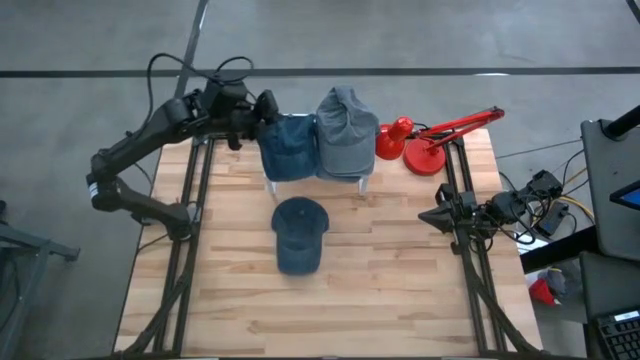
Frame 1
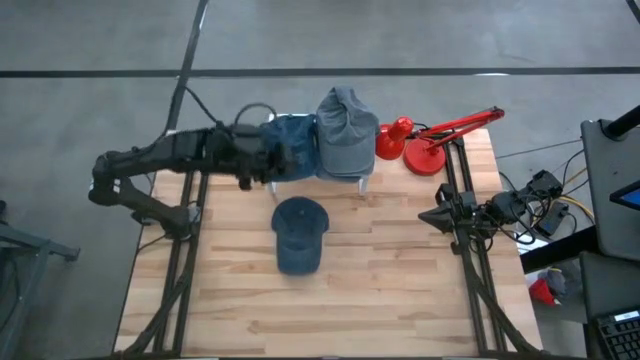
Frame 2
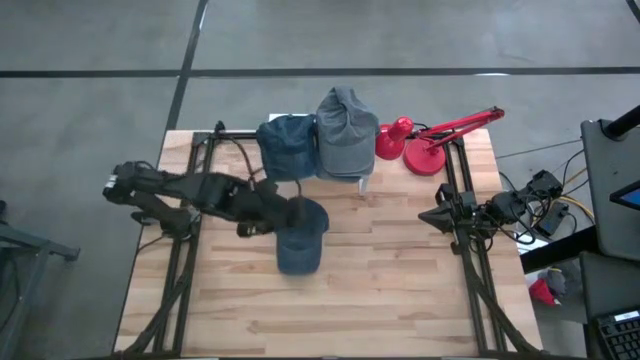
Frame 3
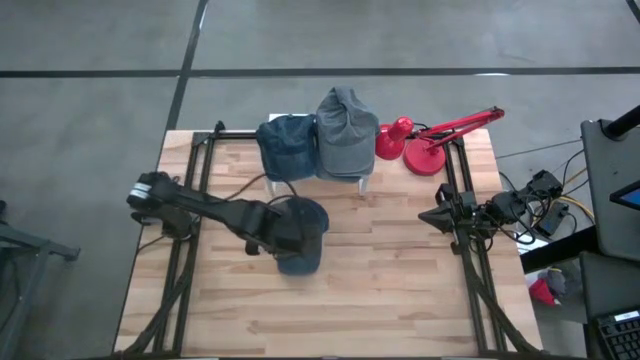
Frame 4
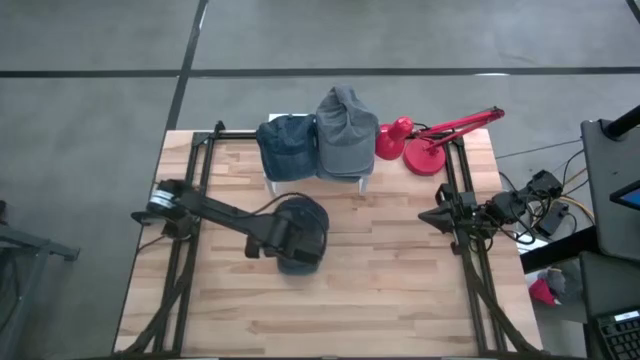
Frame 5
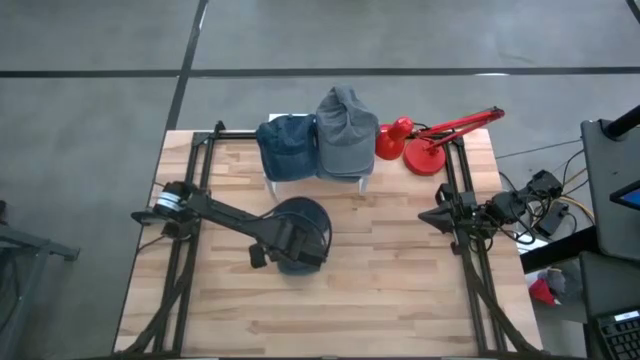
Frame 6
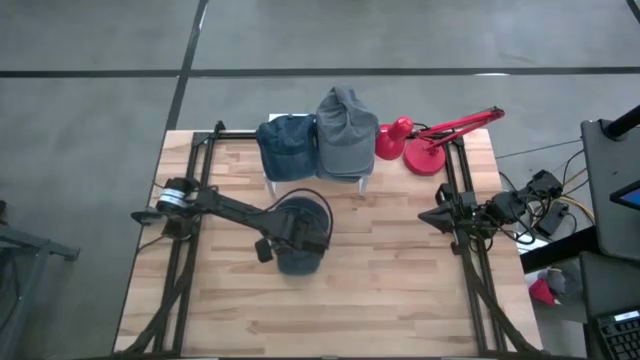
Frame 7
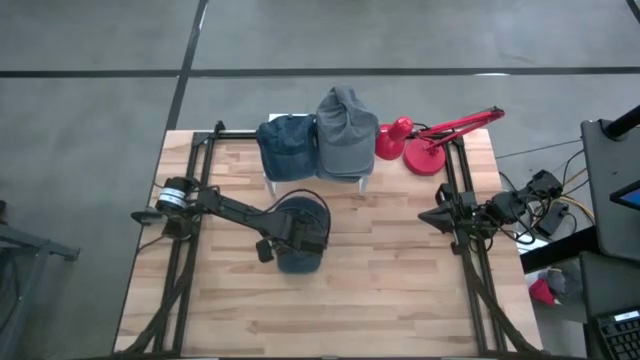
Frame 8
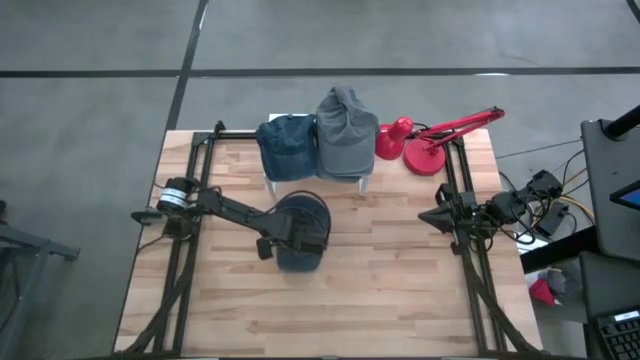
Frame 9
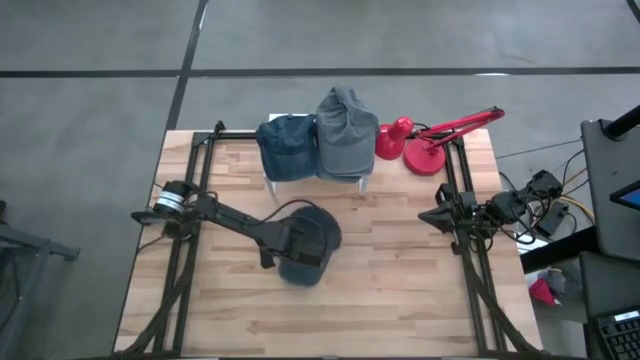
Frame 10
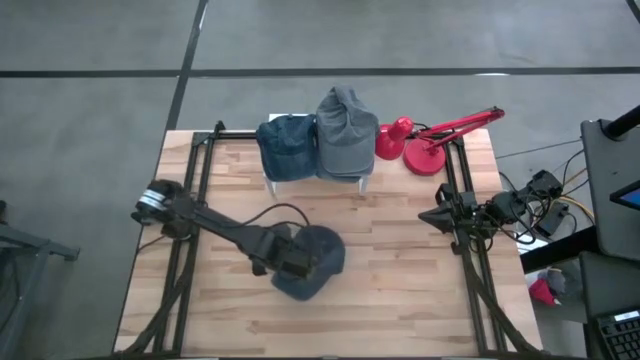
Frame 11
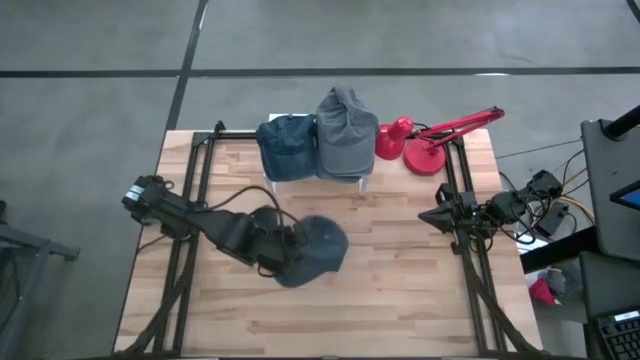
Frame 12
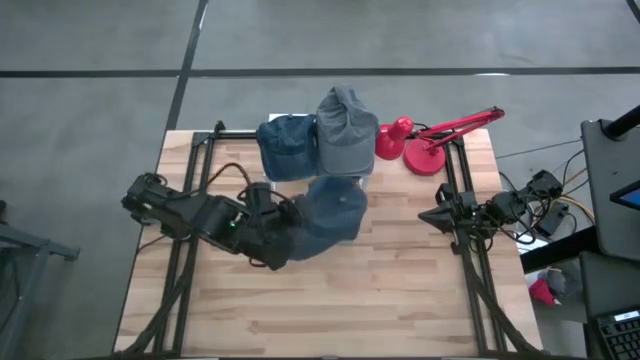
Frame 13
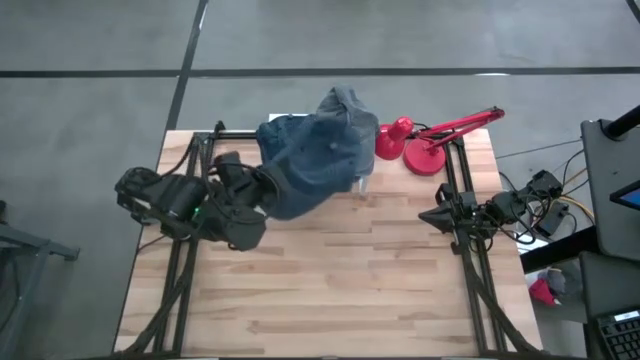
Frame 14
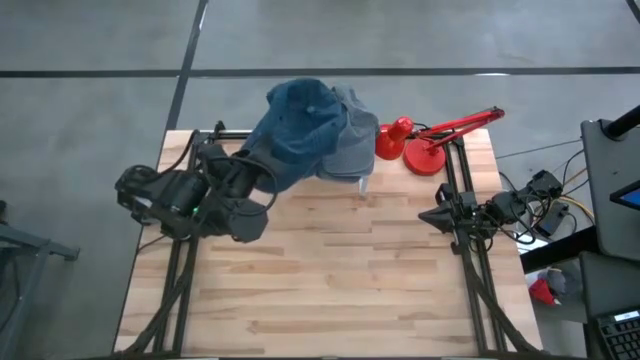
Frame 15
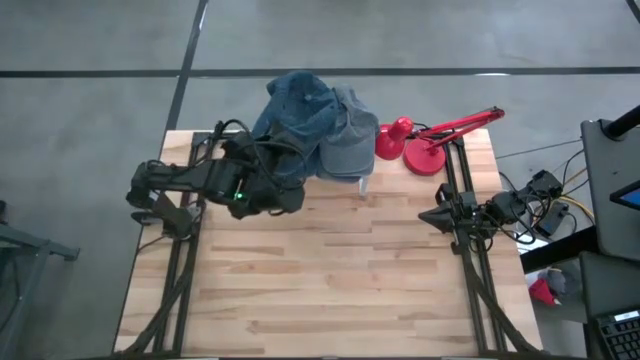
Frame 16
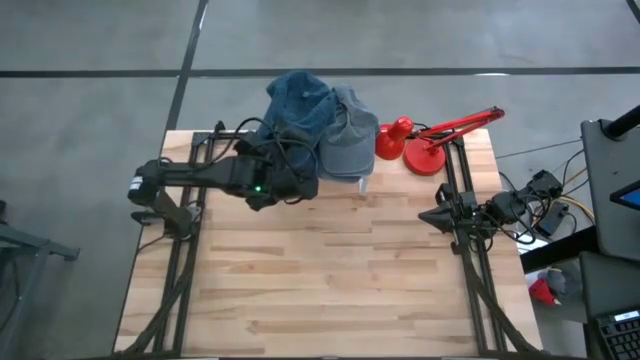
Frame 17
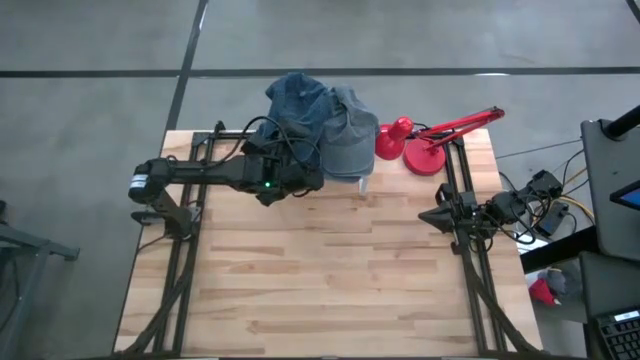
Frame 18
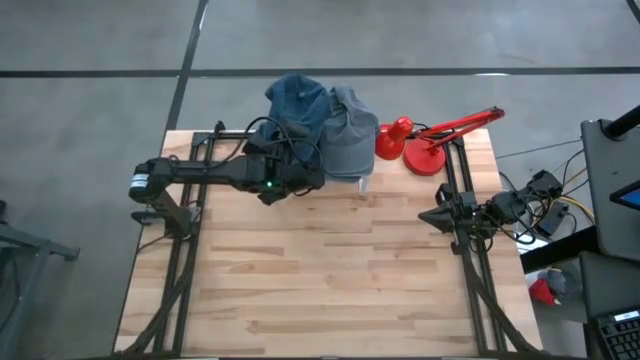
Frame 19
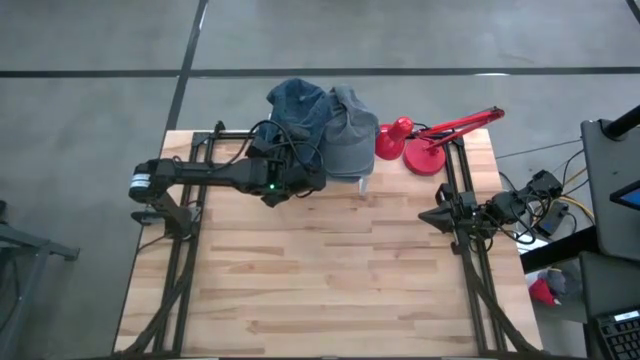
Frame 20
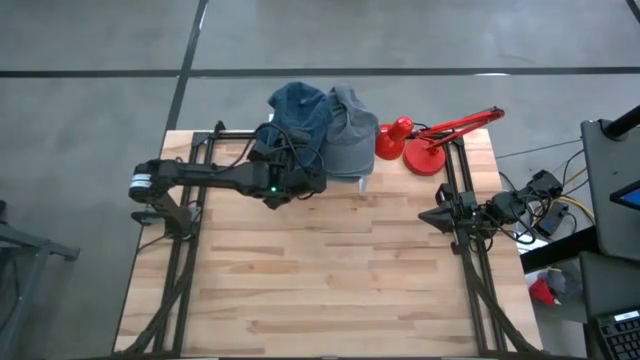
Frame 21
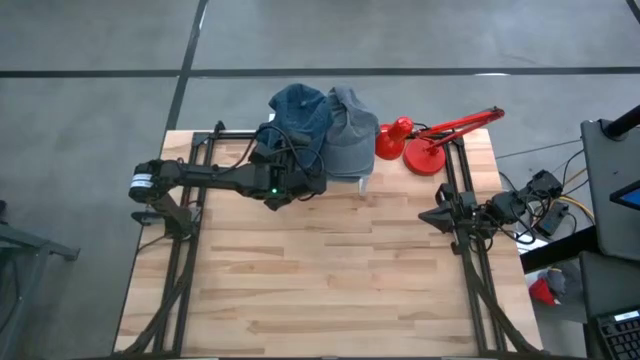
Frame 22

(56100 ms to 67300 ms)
Task: Pick & Place hat
Put the blue cap on top of the blue cap on the shelf

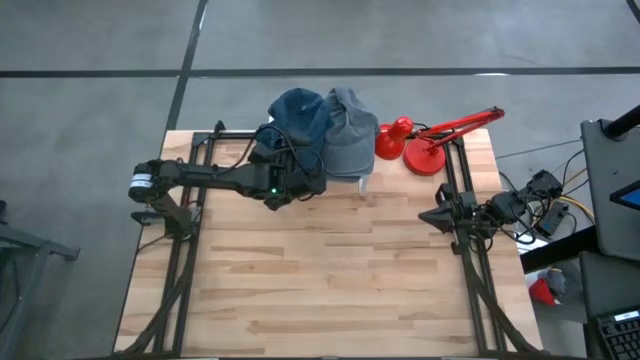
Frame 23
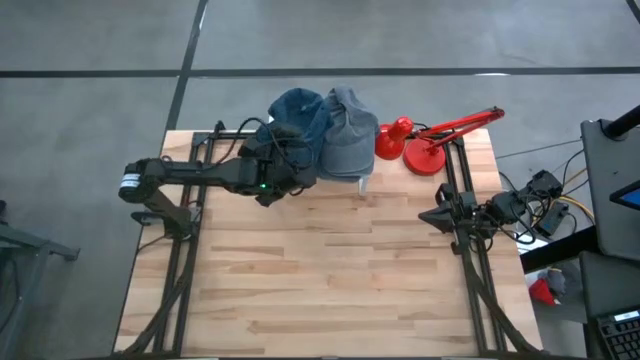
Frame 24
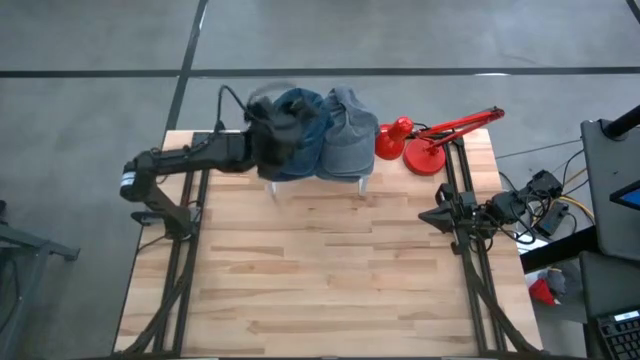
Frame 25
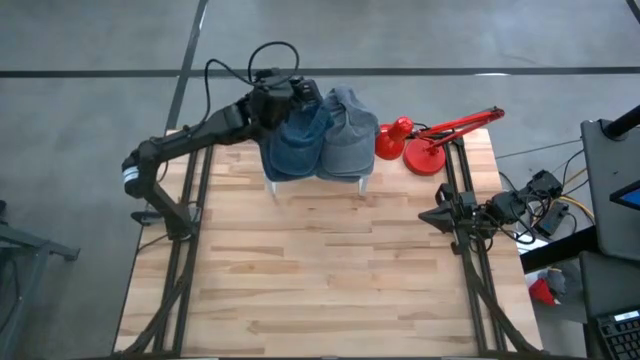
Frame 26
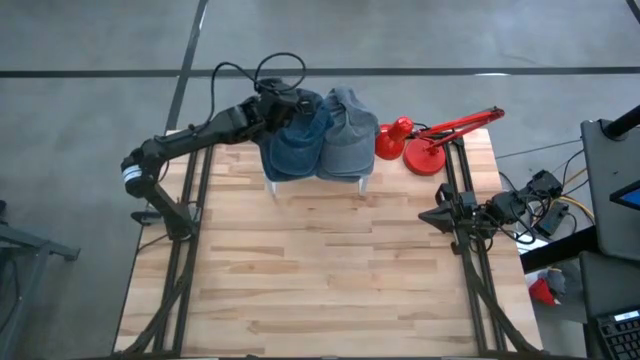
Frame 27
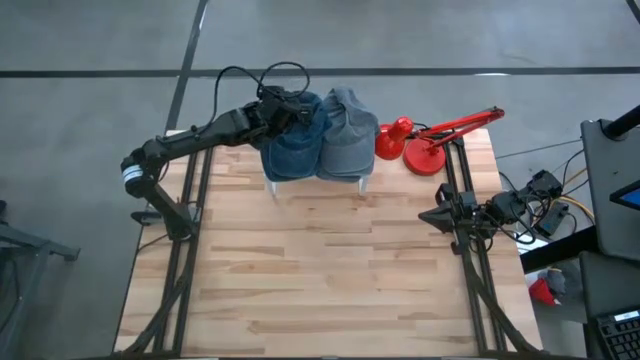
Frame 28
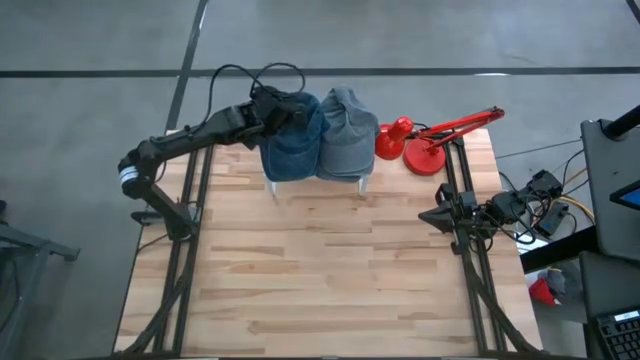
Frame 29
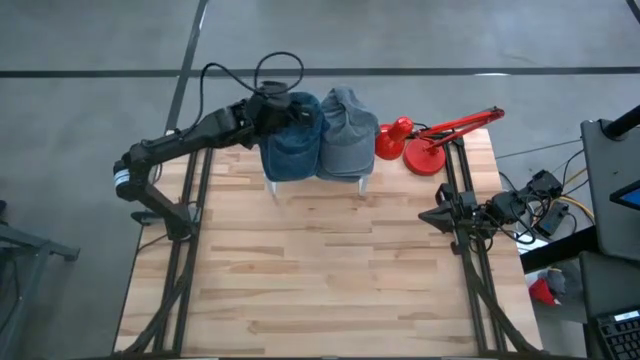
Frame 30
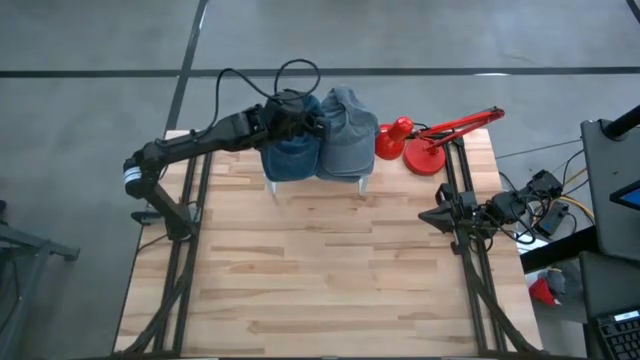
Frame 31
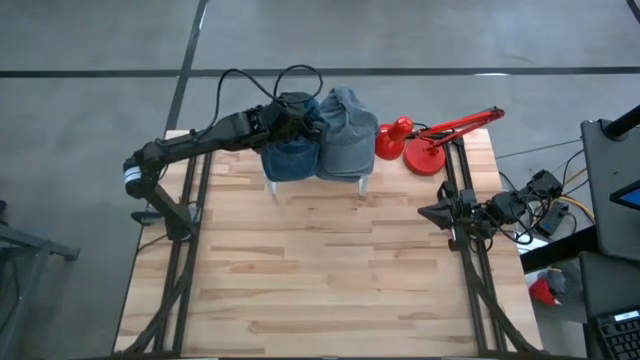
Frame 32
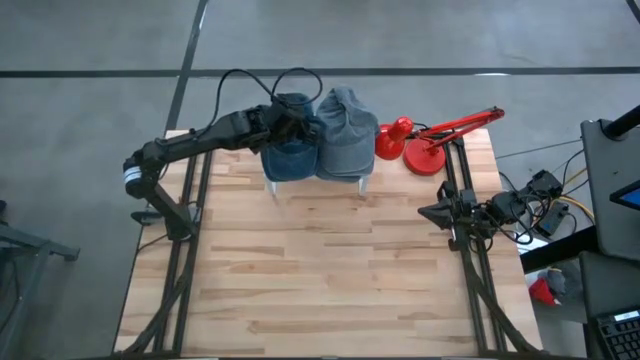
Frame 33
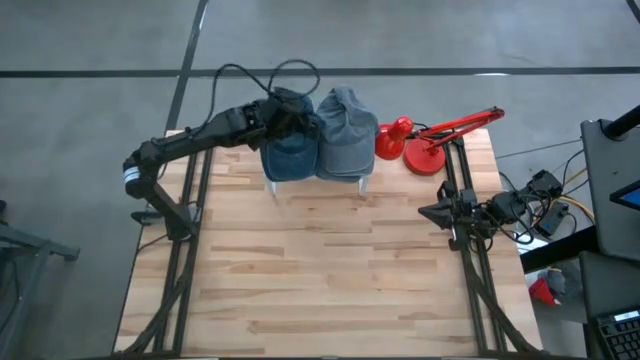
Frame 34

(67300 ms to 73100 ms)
Adjust the blue cap on the shelf

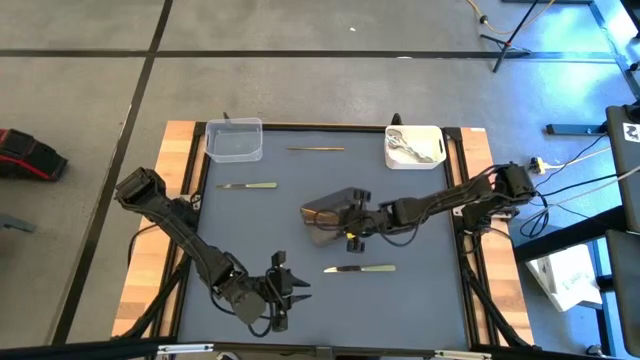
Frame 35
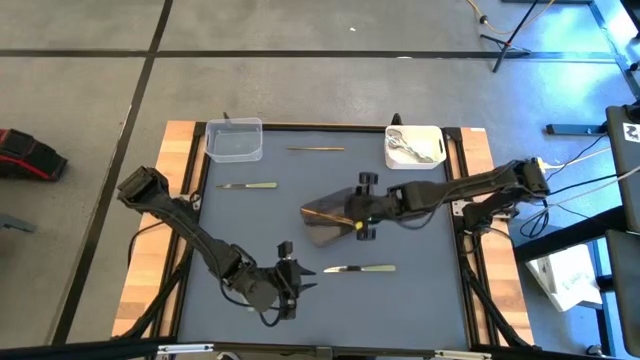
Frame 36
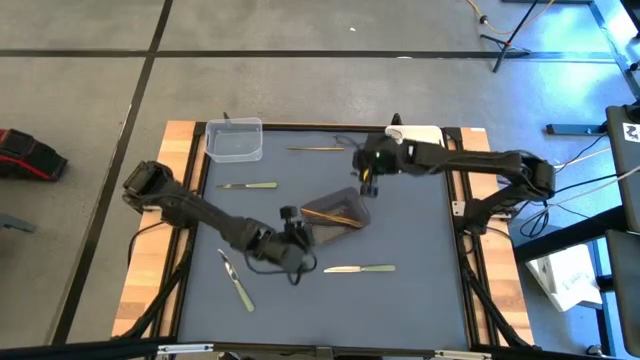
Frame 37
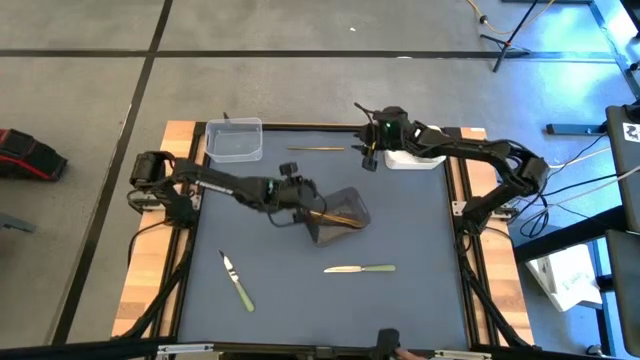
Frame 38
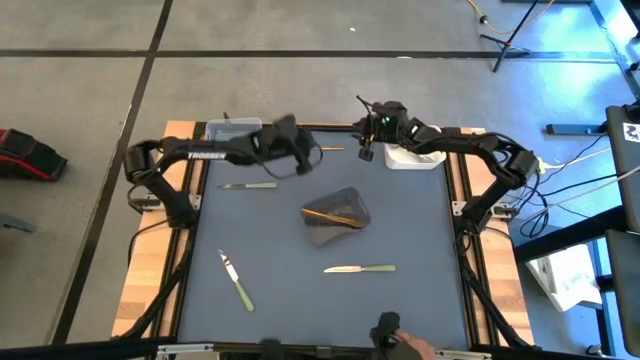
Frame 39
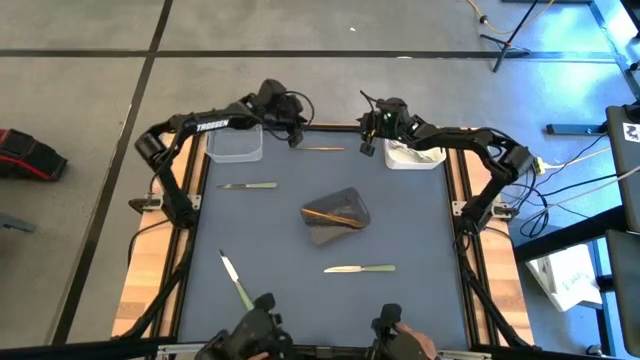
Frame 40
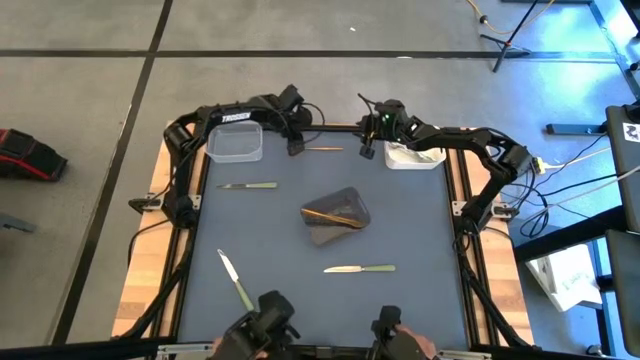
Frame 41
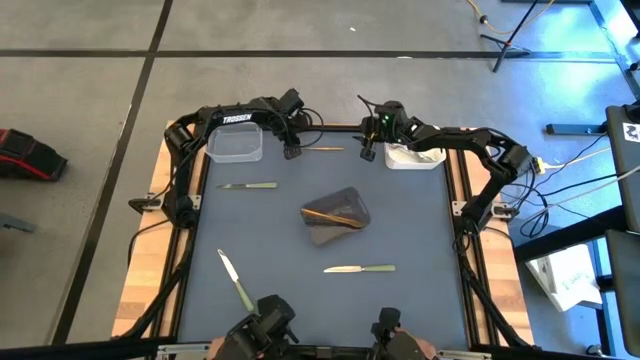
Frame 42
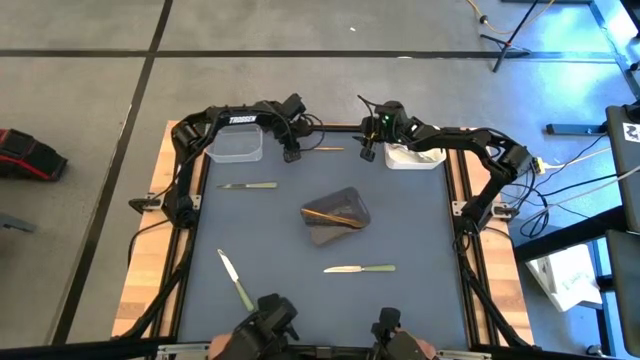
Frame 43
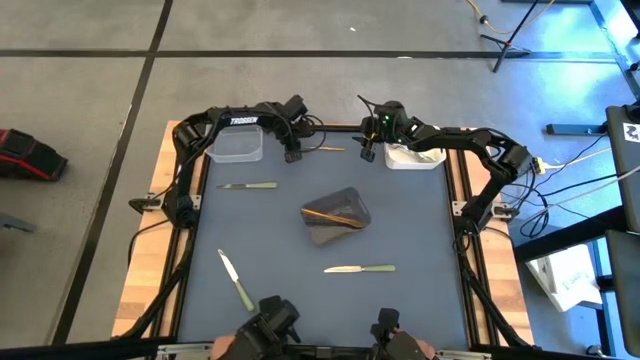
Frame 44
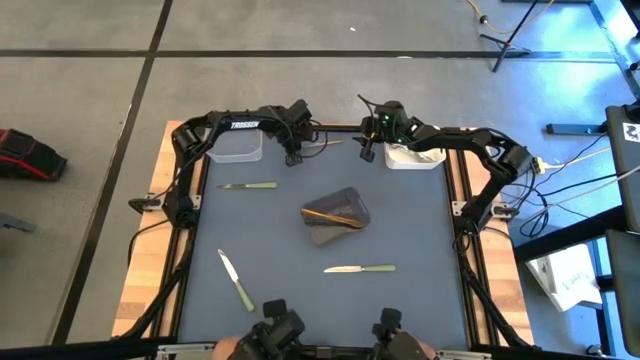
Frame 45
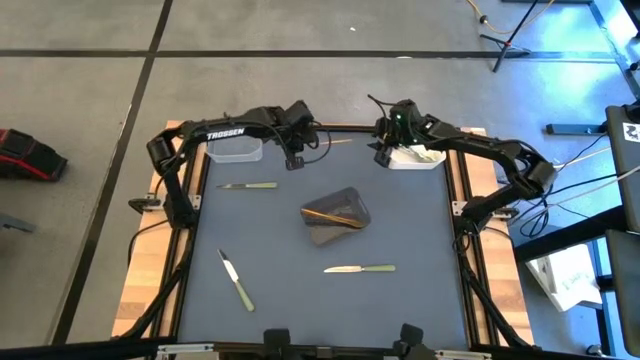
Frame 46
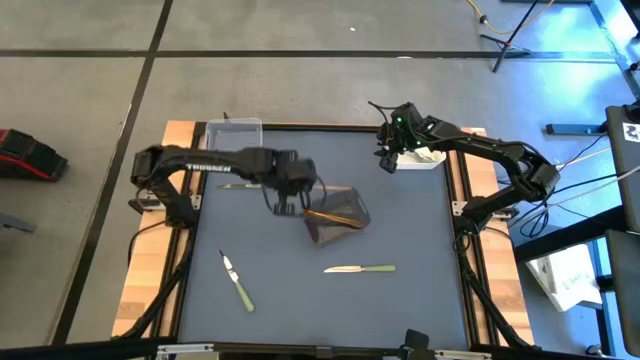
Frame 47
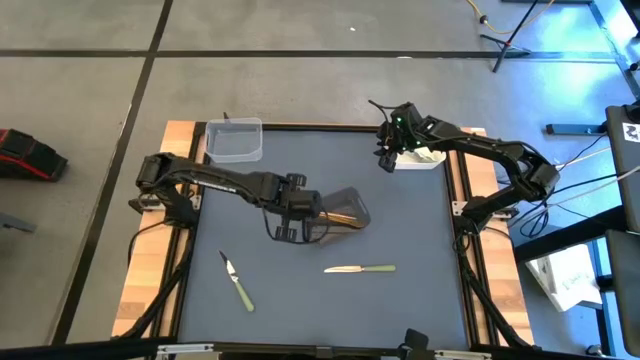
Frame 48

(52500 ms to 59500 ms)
Task: Sort silverware by color (type)
Put the gold table knife into the black bin
